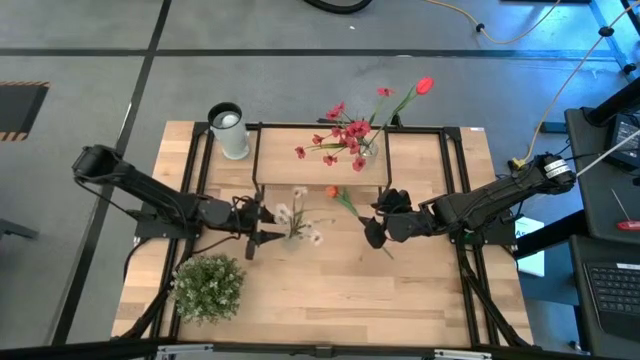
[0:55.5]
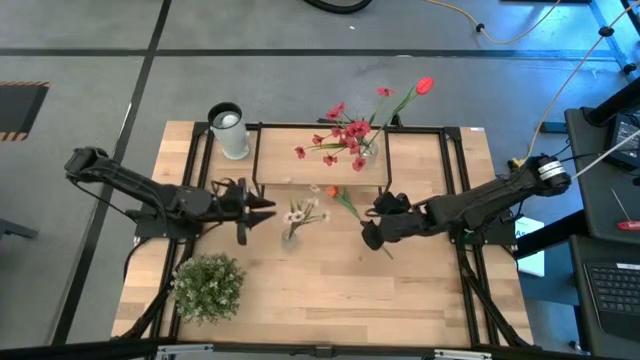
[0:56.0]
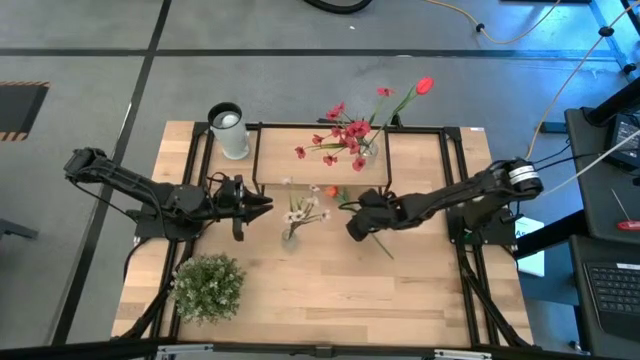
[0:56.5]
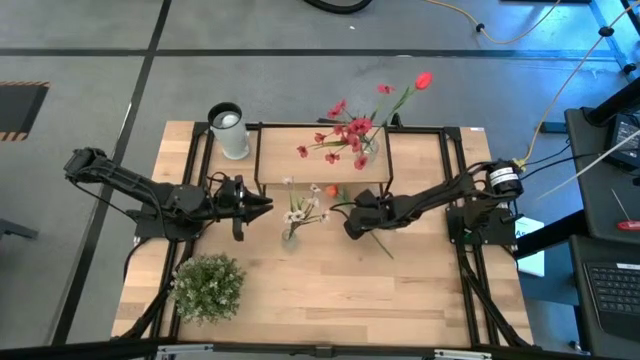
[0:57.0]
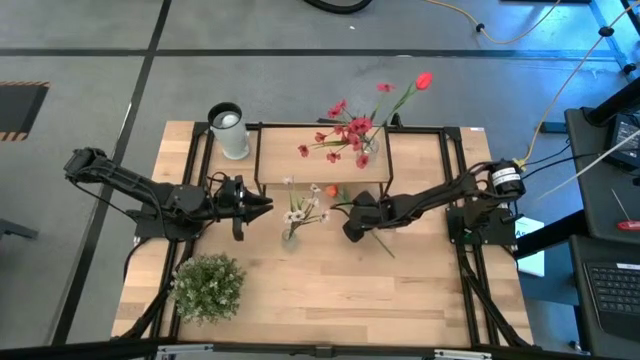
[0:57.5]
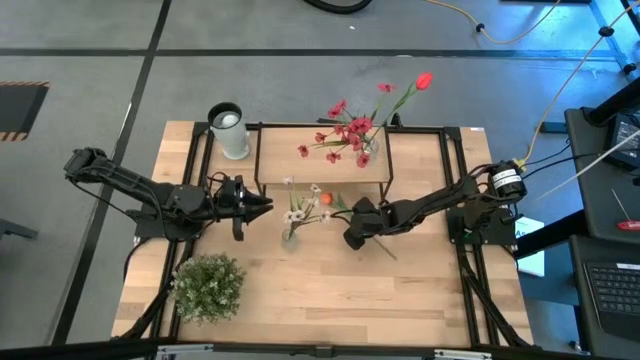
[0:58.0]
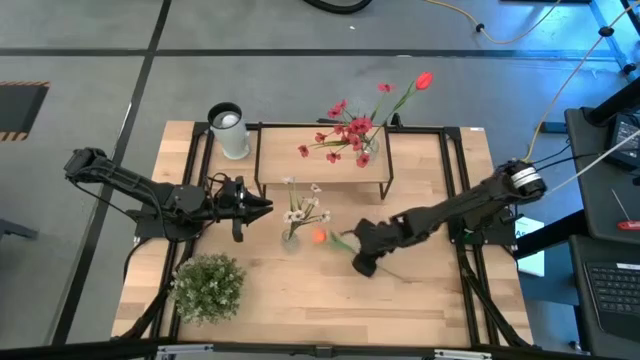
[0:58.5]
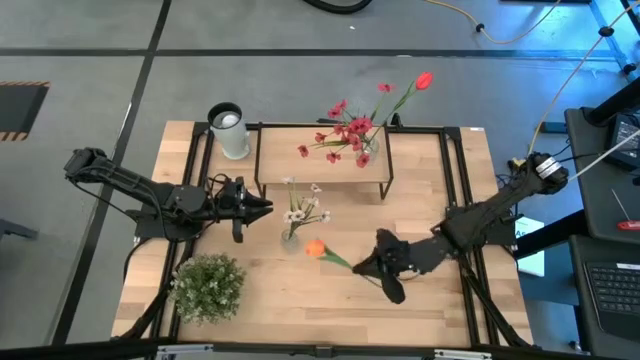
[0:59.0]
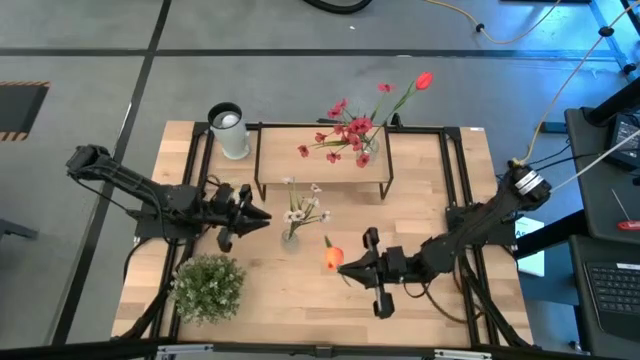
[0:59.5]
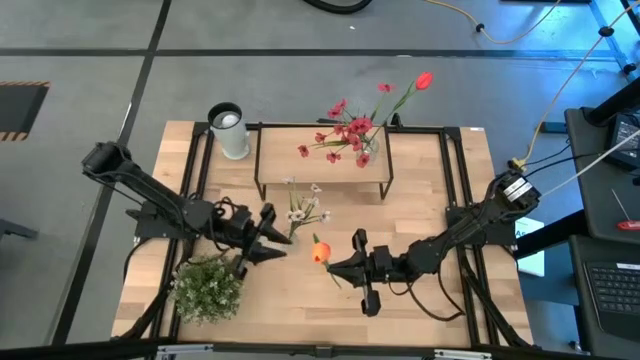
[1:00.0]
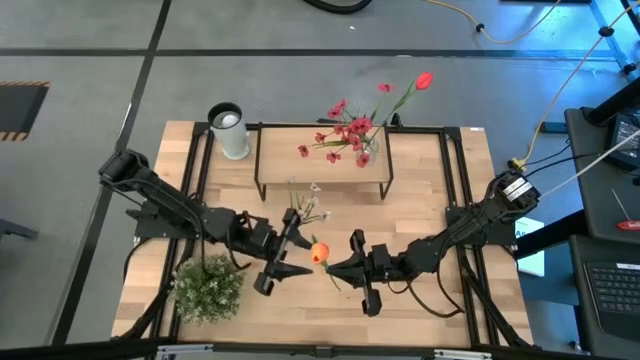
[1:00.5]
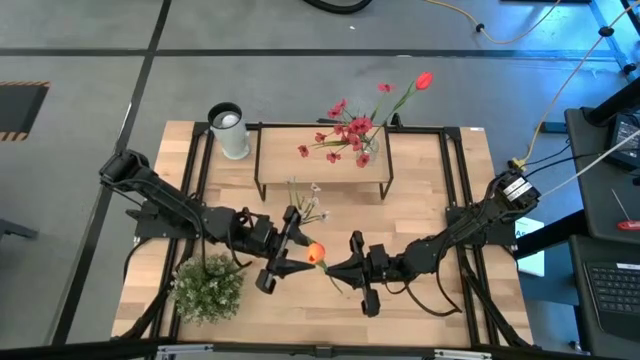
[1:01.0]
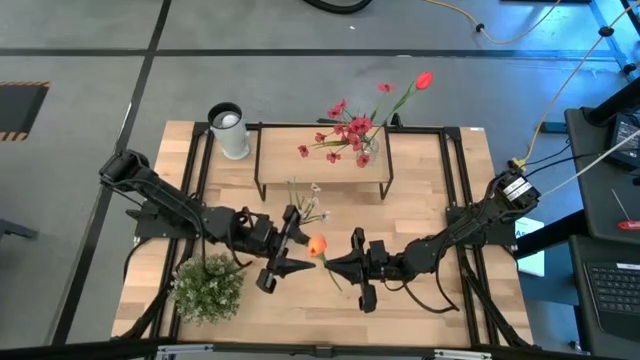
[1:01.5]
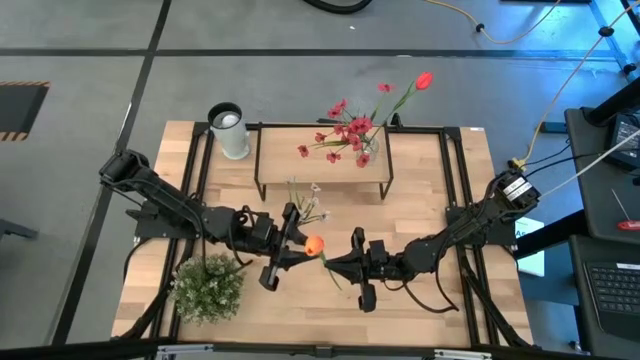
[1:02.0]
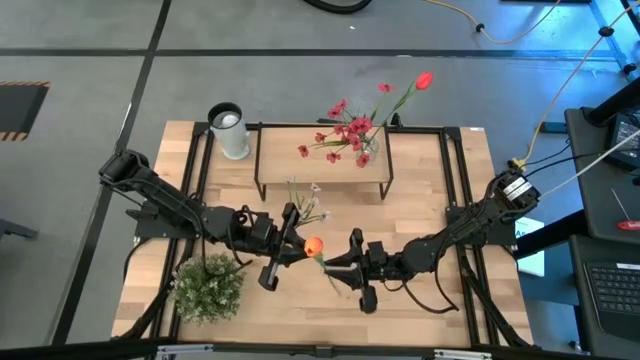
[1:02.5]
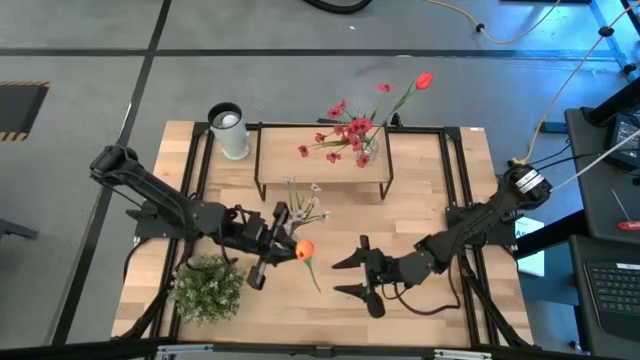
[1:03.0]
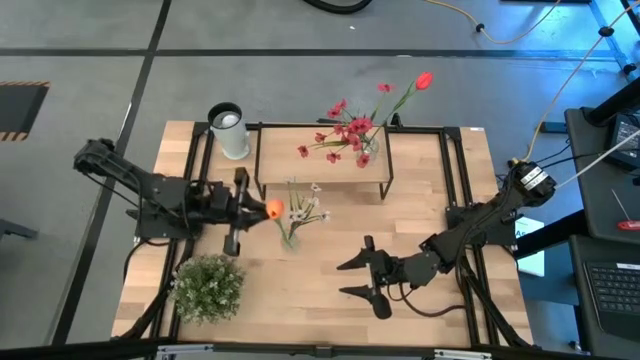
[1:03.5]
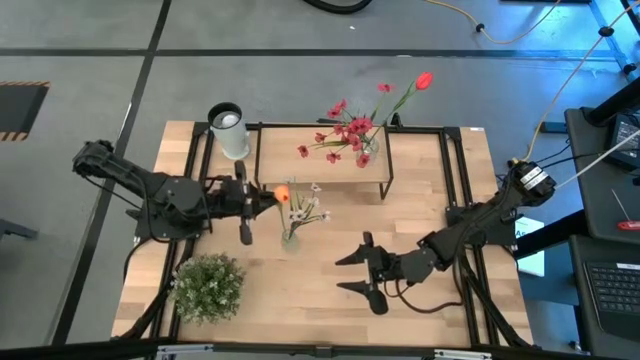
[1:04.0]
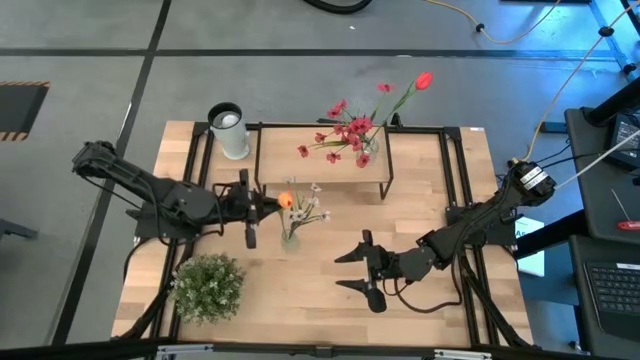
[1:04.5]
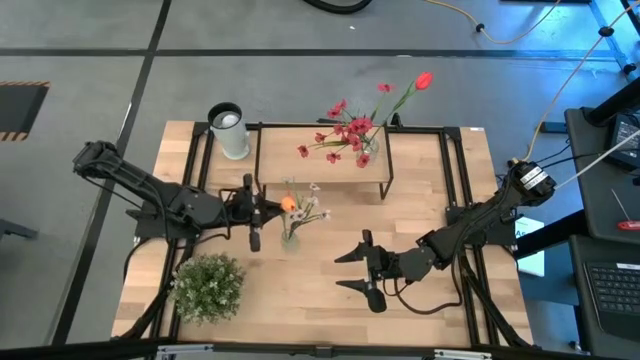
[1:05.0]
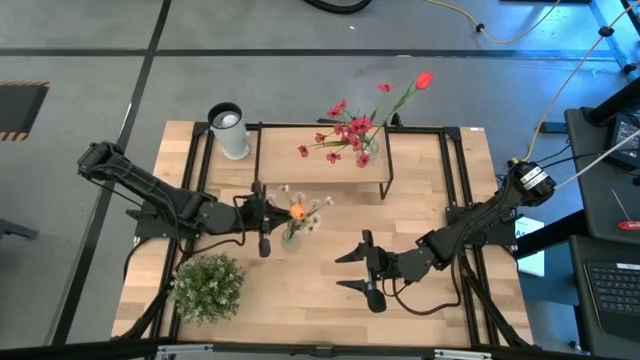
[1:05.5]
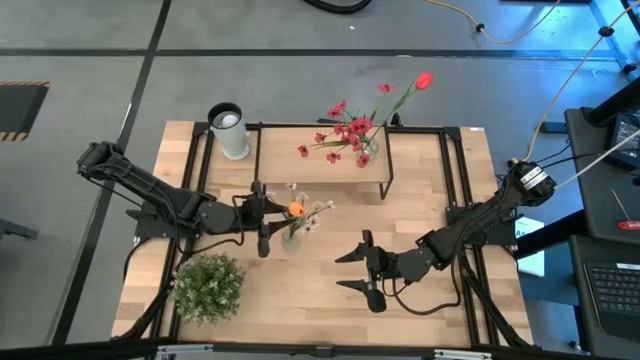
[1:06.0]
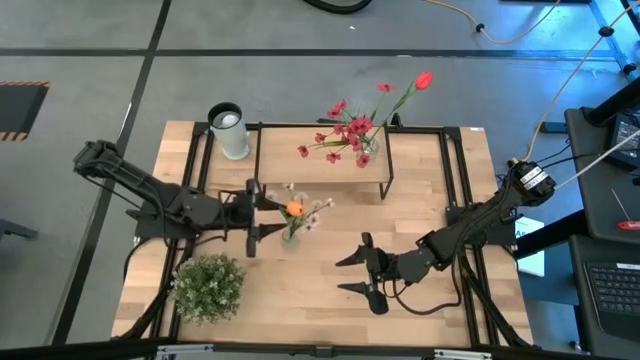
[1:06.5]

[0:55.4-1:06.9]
Task: Pick and place flowers into a vace then onto a shelf
Put the orange tulip into the transparent vase

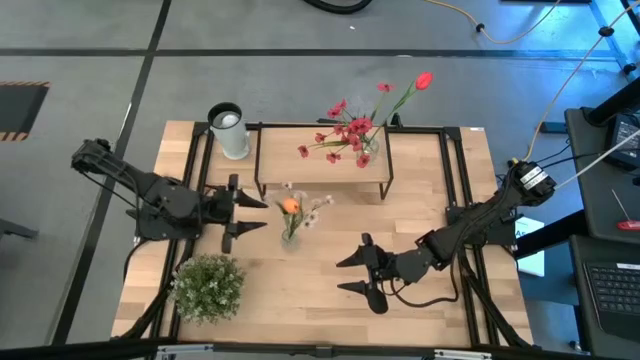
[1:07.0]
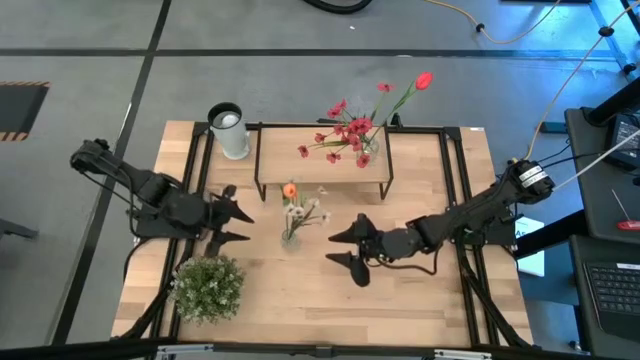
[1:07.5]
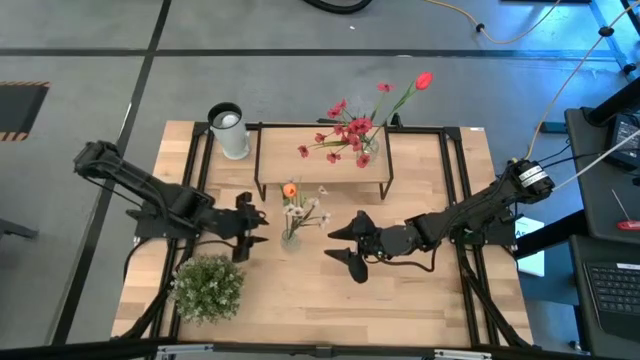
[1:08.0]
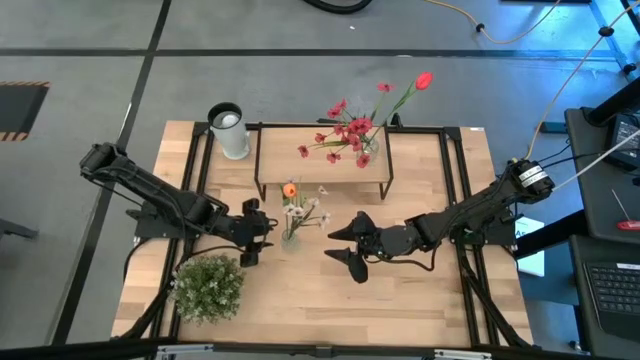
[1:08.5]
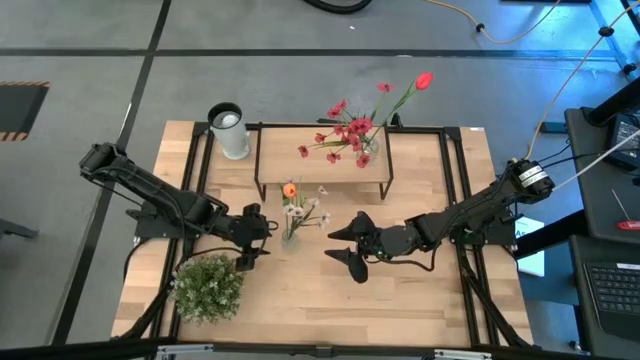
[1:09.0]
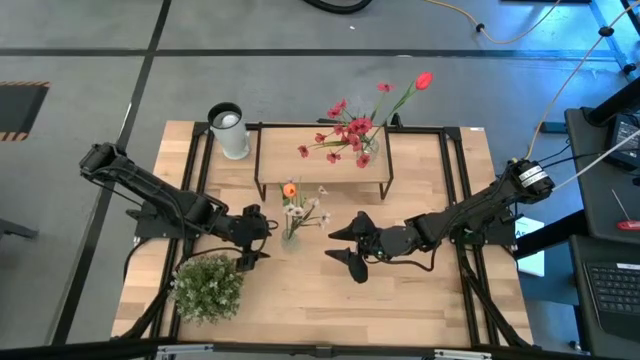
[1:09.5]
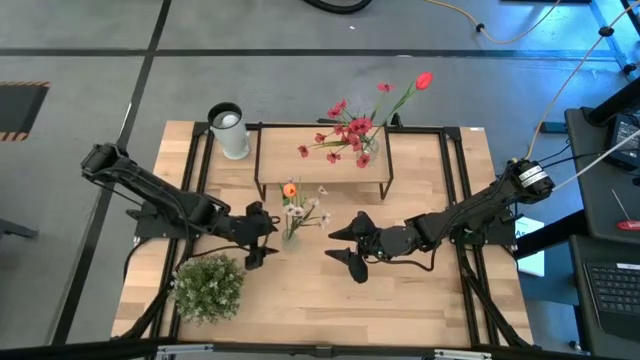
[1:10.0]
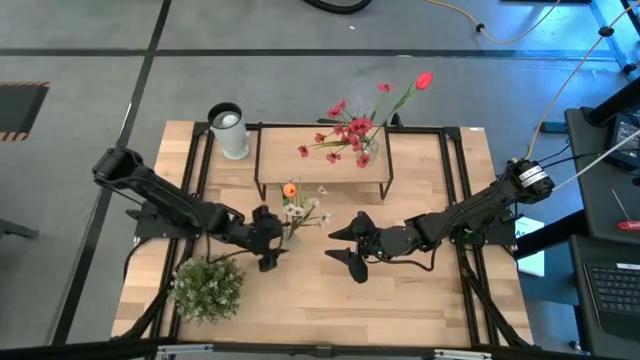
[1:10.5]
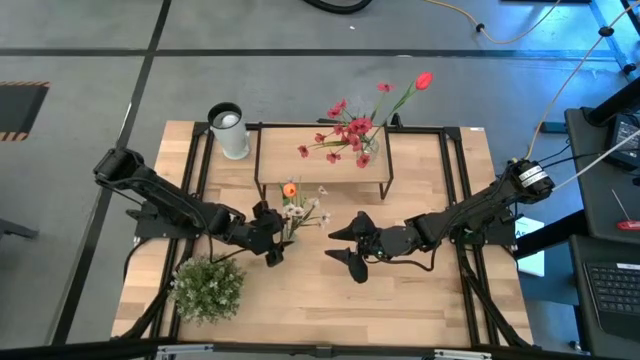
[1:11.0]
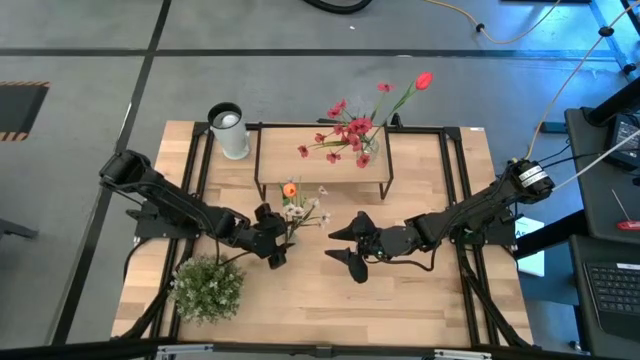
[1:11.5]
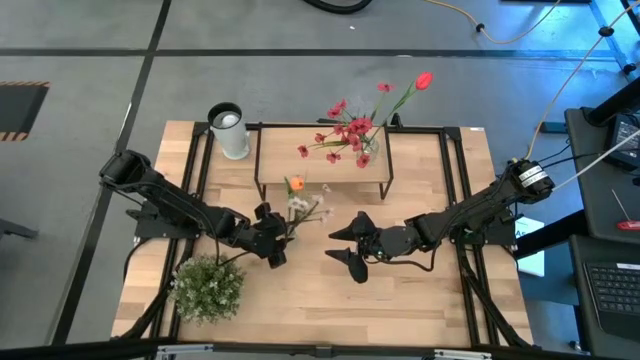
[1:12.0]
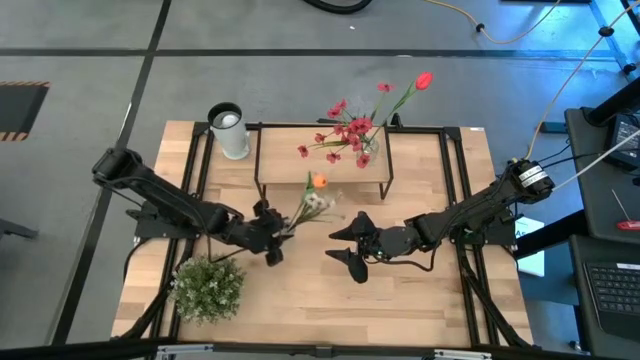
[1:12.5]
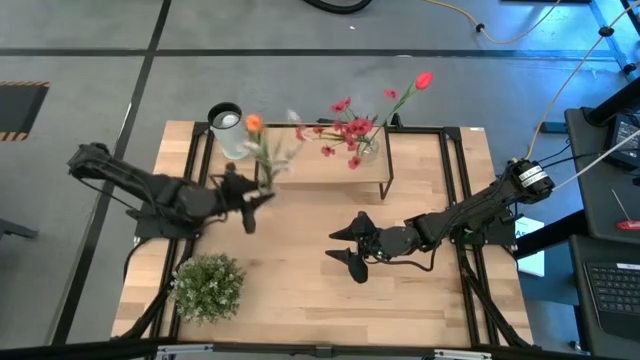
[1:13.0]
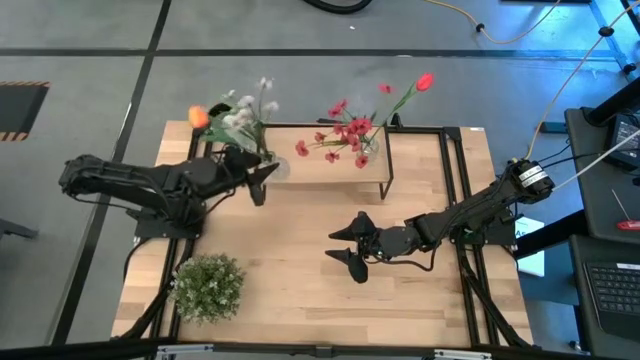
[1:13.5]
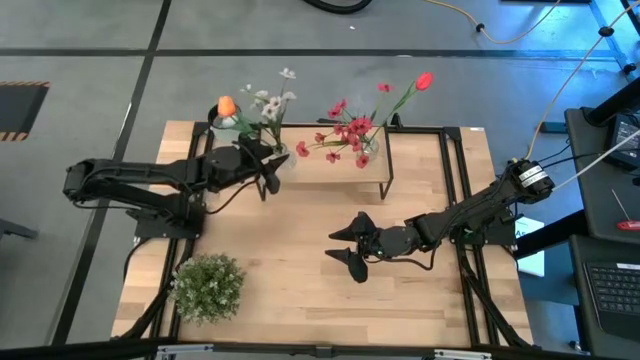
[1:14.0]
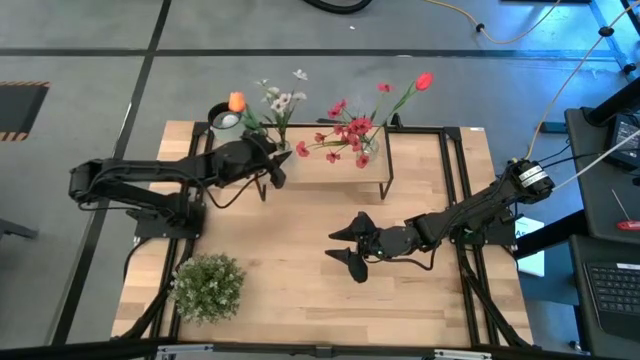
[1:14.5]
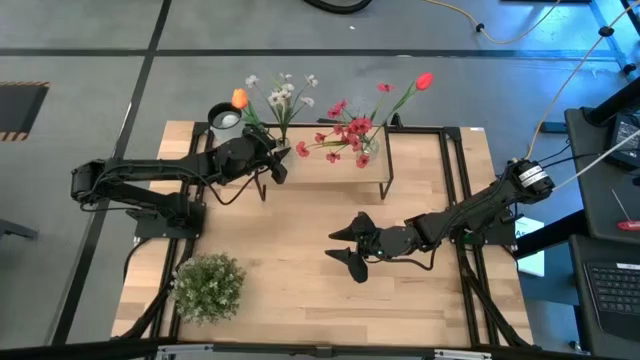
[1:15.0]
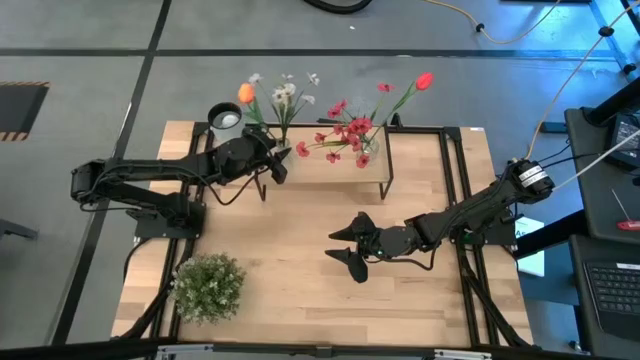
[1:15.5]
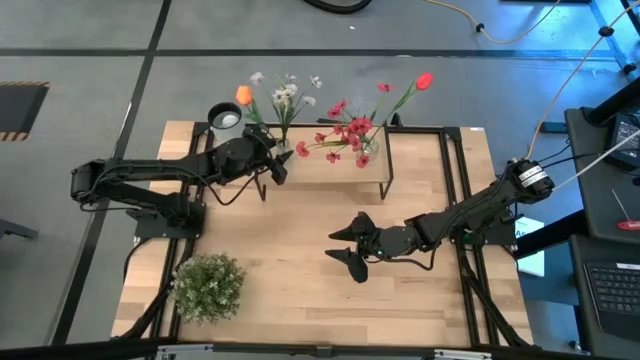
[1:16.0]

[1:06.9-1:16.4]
Put the transparent vase on the shelf
